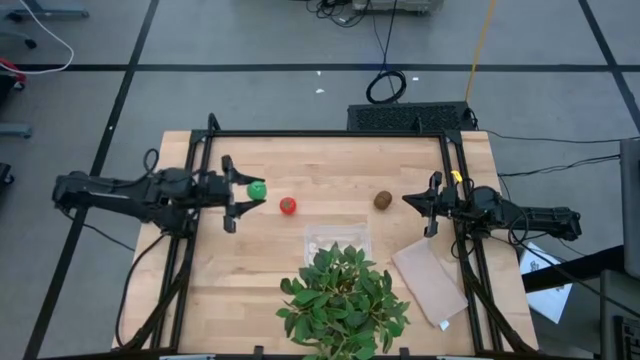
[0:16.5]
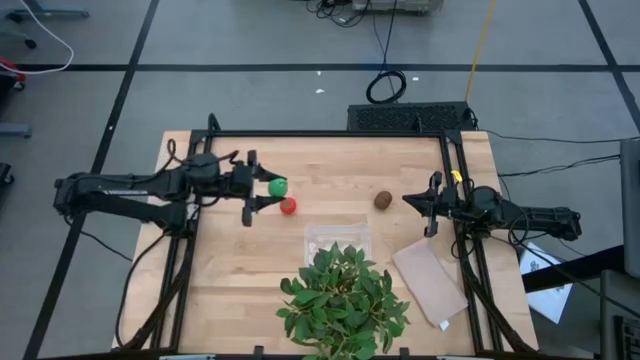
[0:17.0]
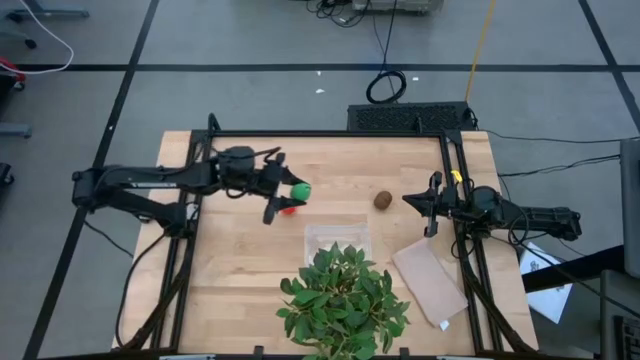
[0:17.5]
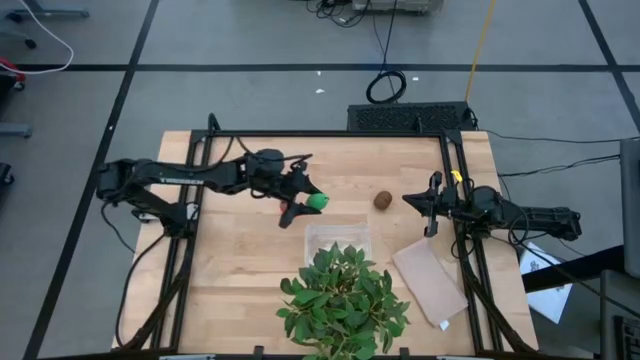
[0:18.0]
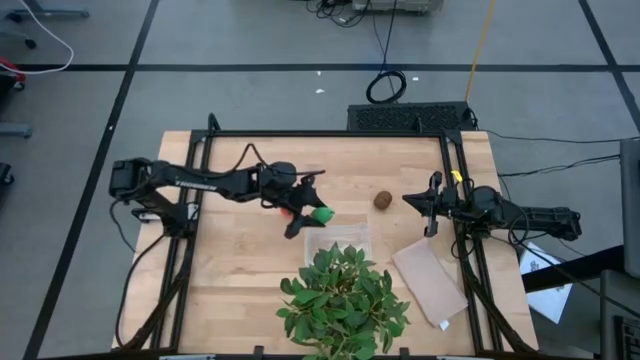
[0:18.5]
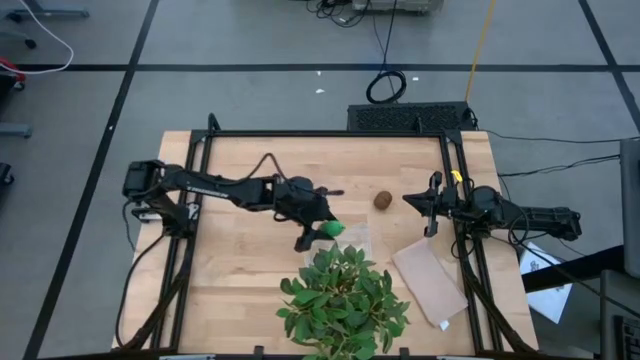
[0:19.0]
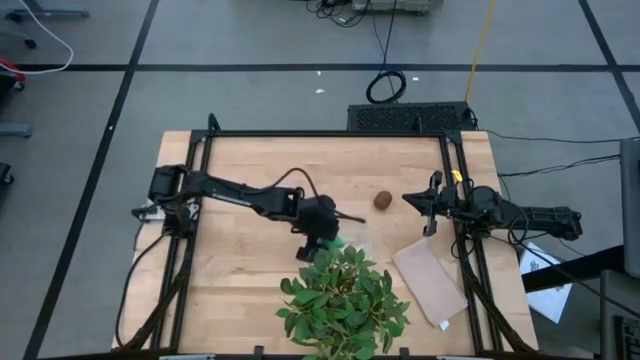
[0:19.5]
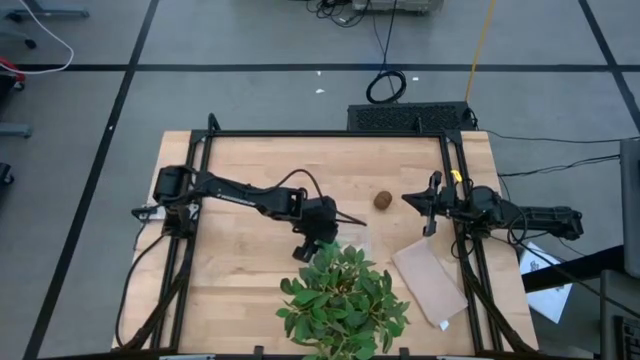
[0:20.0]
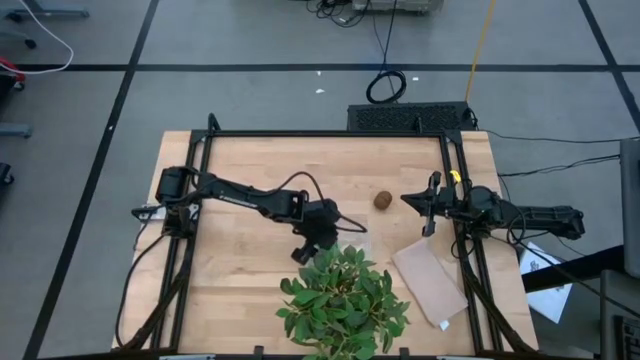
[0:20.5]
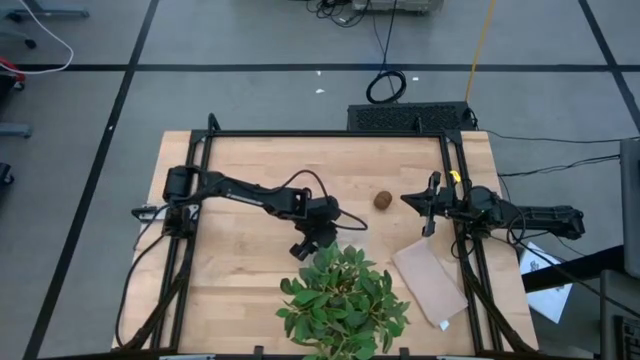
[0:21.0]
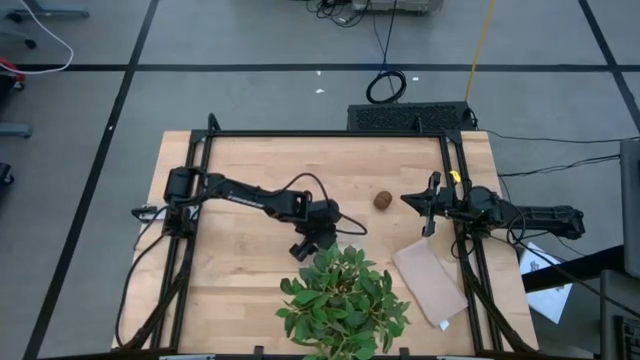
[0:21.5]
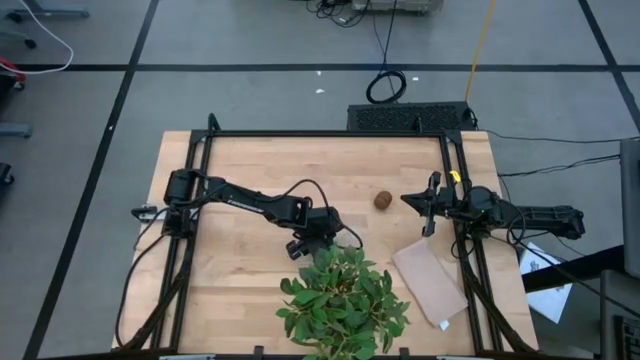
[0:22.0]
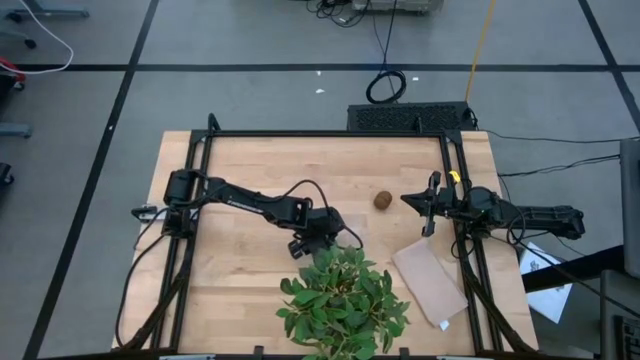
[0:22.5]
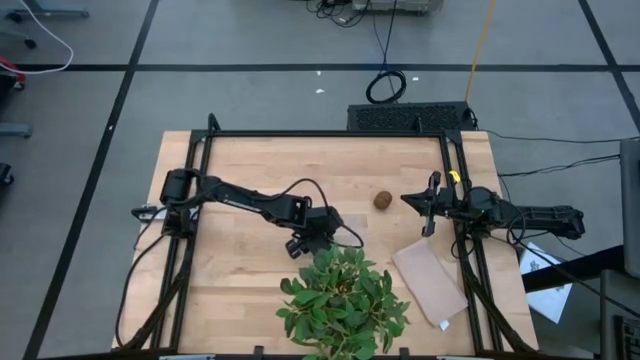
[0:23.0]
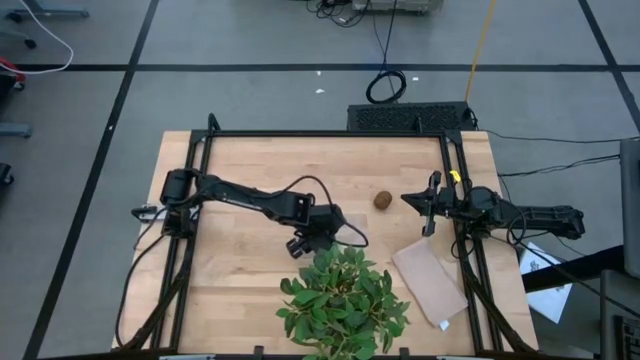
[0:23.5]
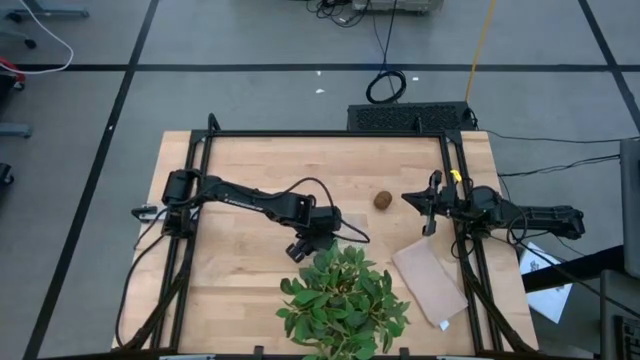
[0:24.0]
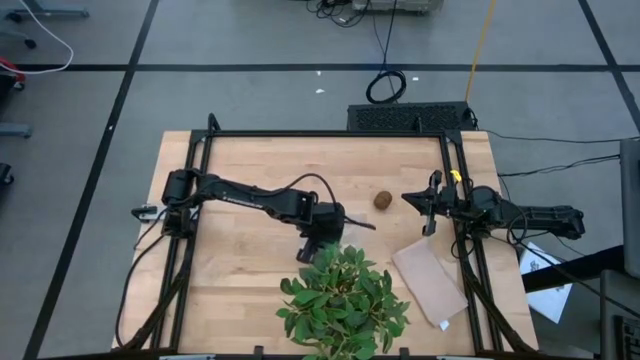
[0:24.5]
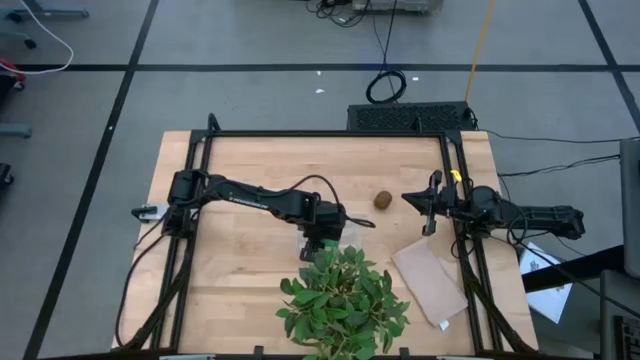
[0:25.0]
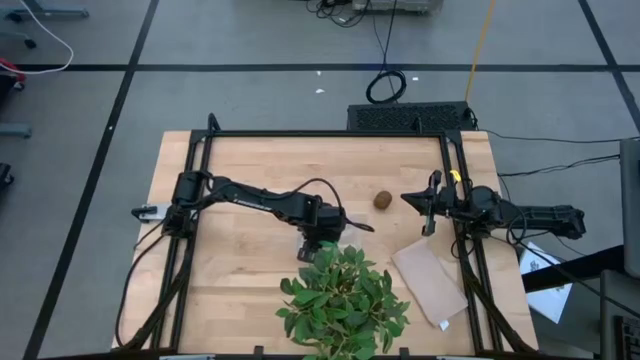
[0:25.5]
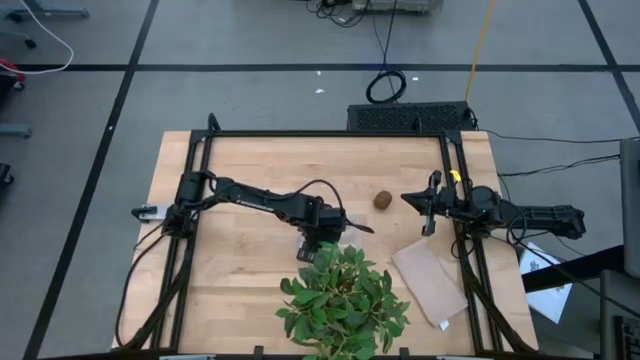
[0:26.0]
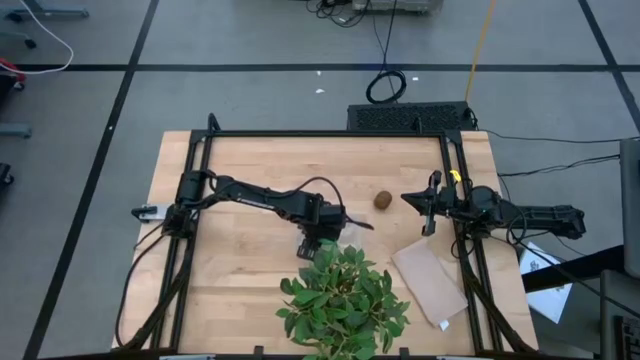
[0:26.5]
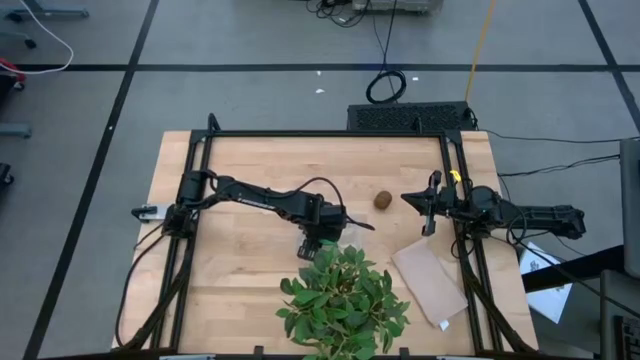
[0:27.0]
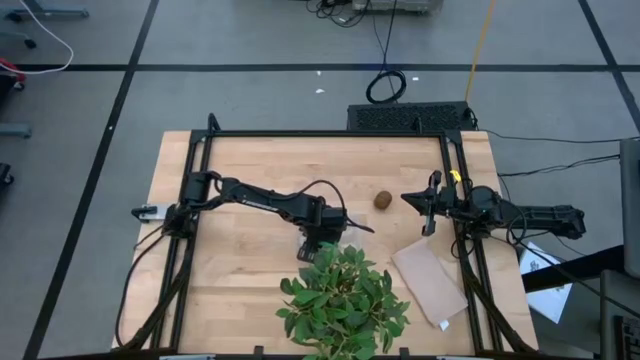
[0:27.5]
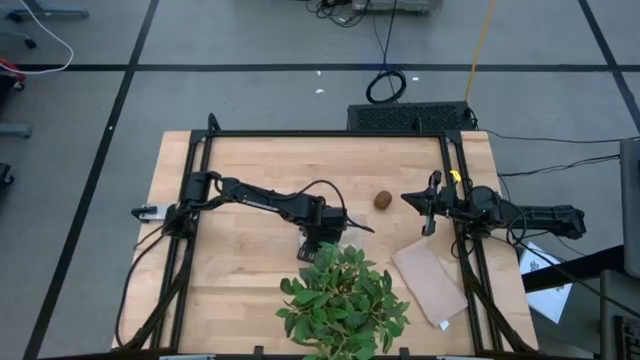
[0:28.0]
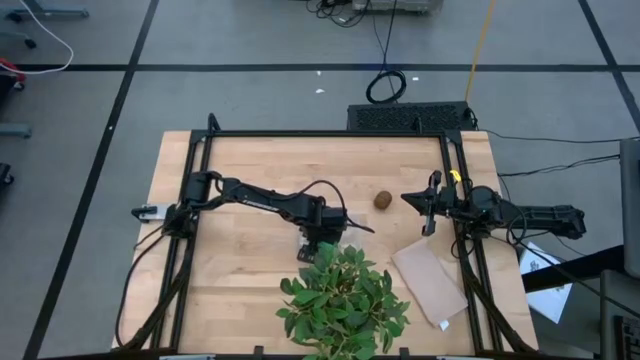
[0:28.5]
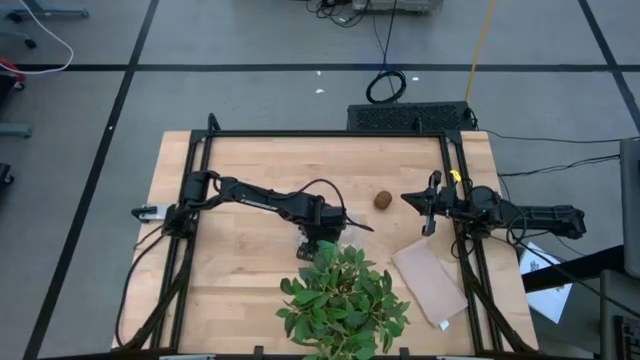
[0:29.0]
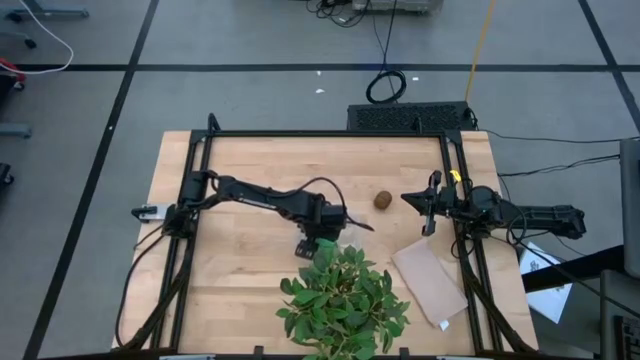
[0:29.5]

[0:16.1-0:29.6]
Task: Pick and placing Produce into tupperware
Put the green corn into the transparent bin

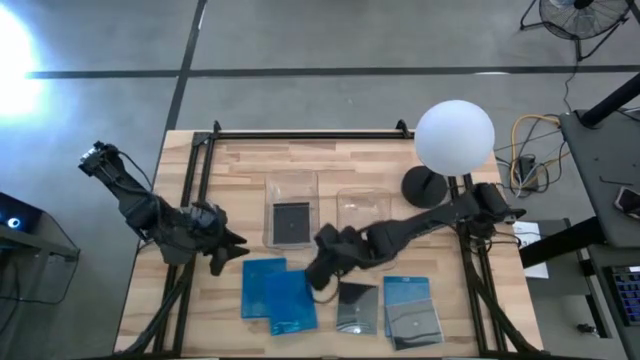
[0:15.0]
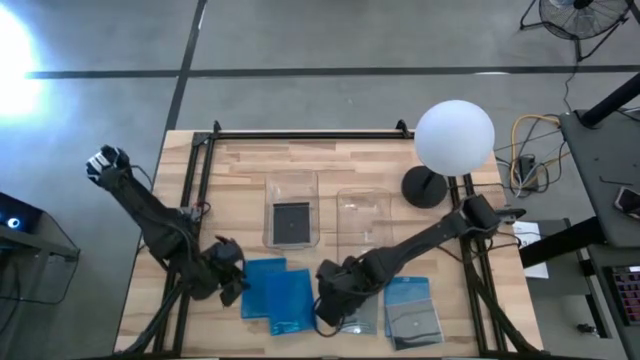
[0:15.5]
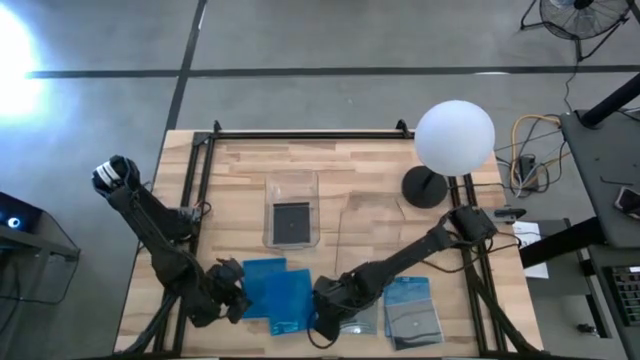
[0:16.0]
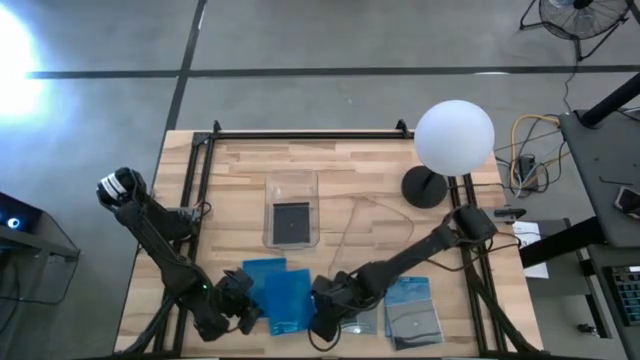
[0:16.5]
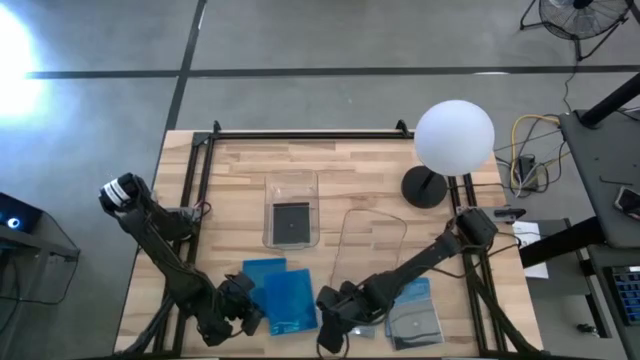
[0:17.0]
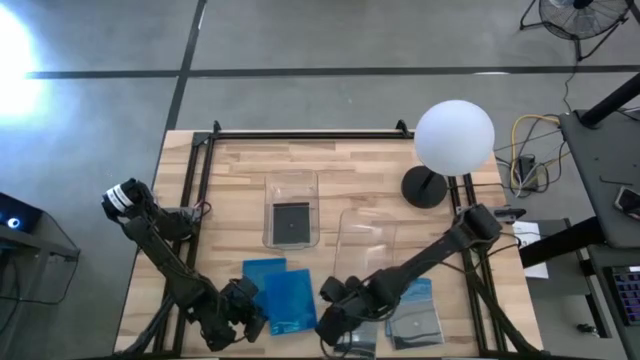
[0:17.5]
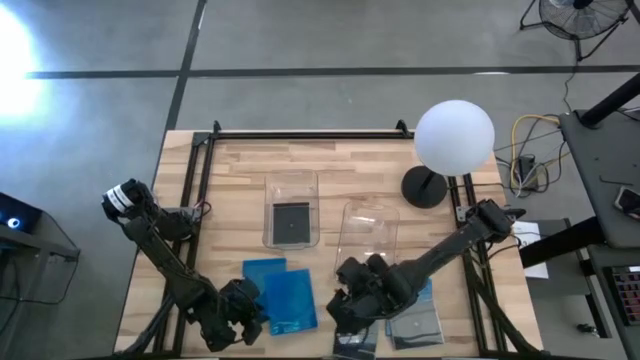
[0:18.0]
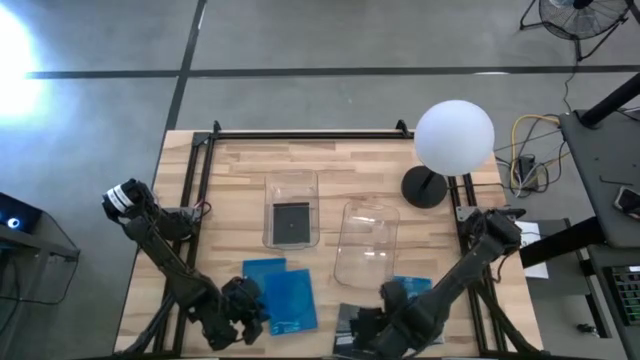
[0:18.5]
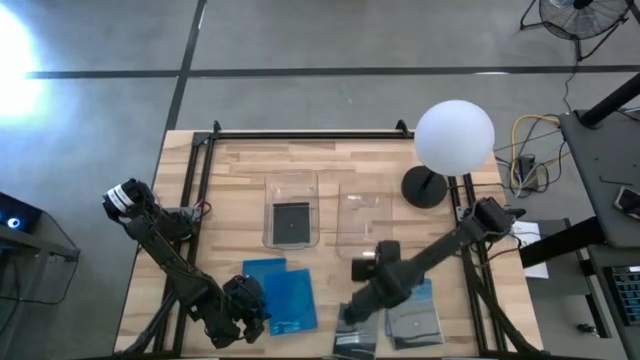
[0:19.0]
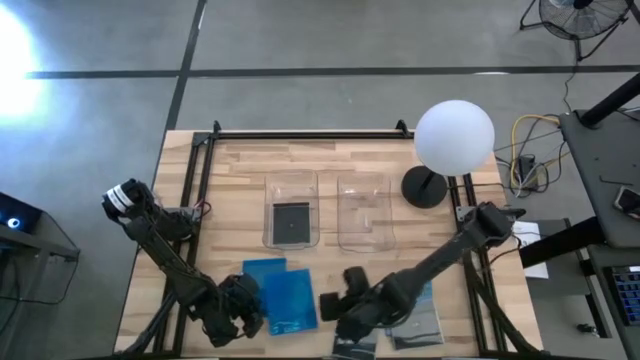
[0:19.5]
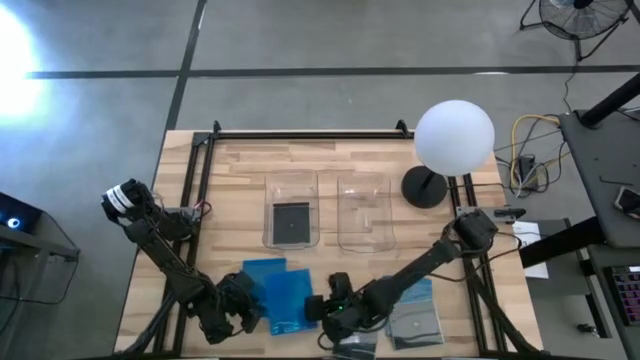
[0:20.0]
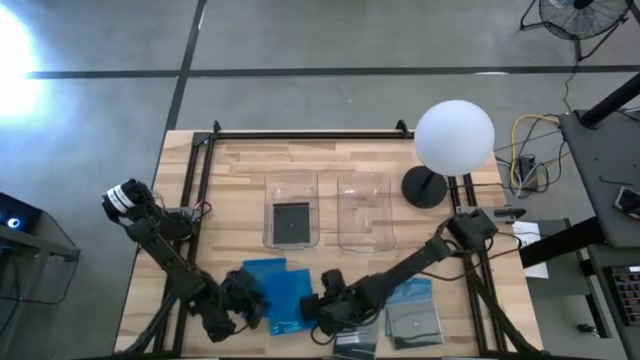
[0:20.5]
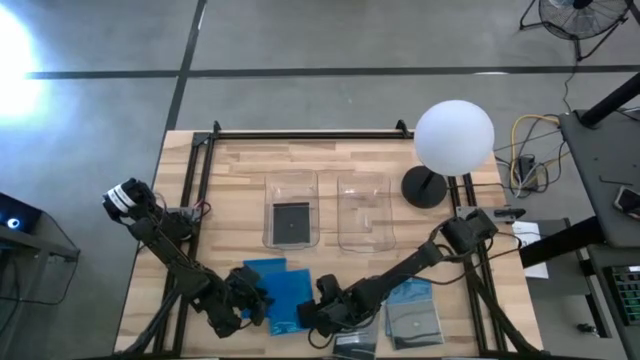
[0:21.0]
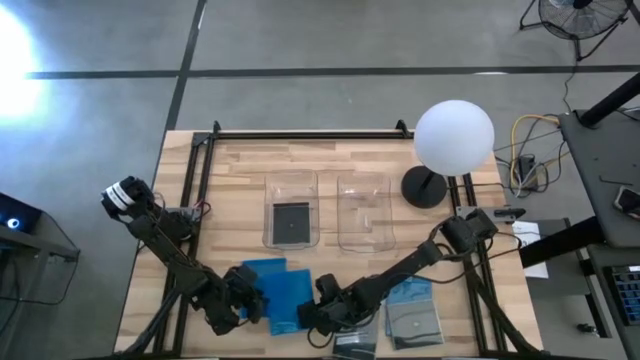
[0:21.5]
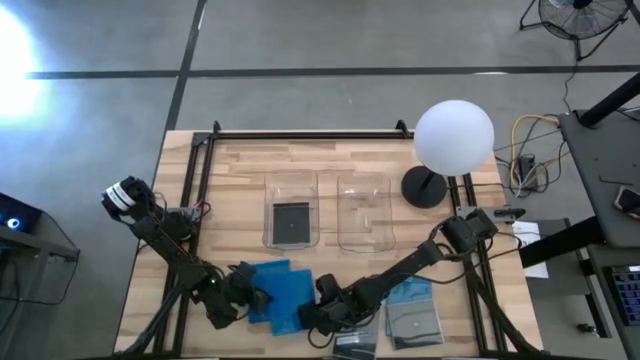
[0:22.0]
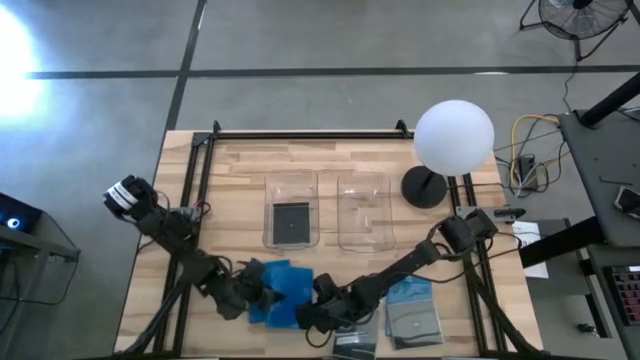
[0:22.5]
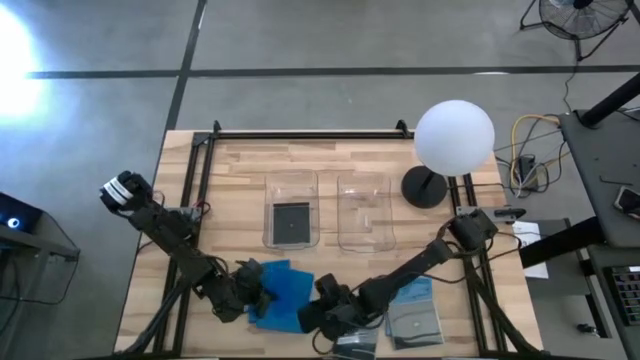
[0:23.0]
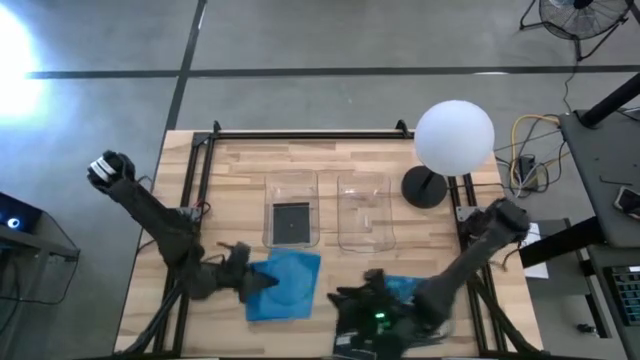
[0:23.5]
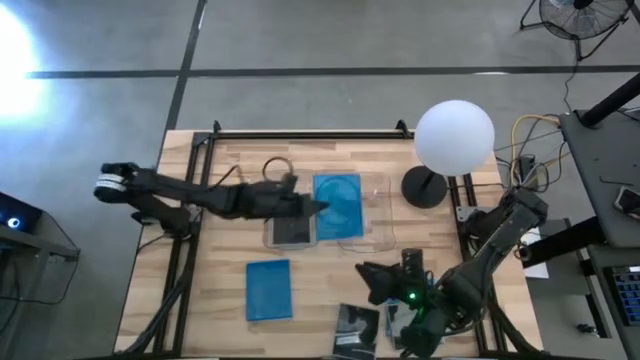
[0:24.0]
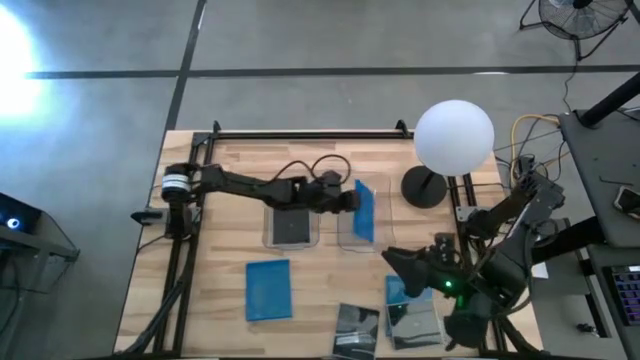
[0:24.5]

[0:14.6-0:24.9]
Task: Pick & place jewel cases by type
Put the middle blue cd case into the right transparent bin
